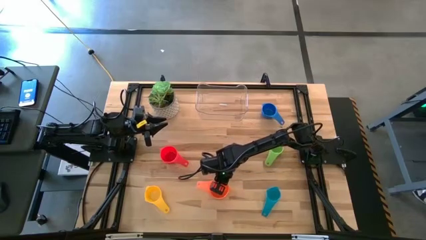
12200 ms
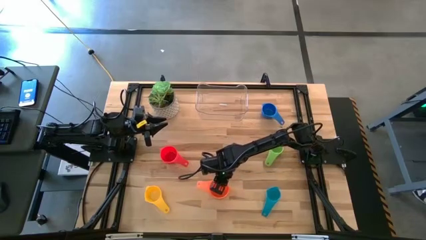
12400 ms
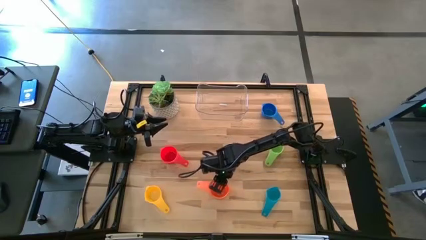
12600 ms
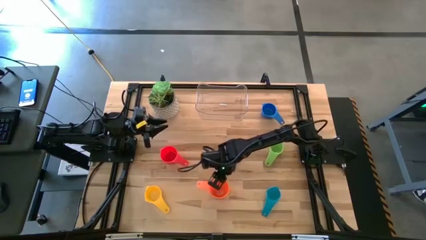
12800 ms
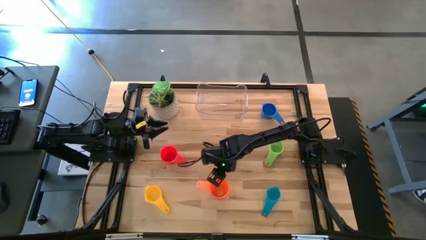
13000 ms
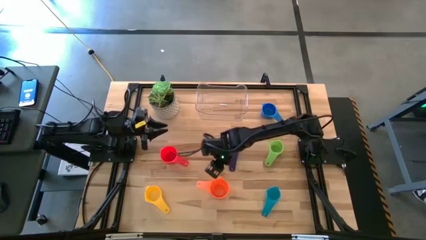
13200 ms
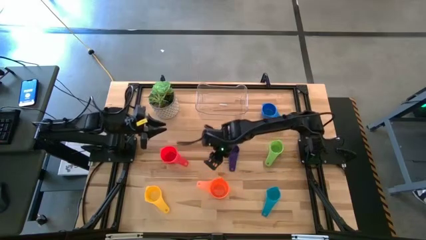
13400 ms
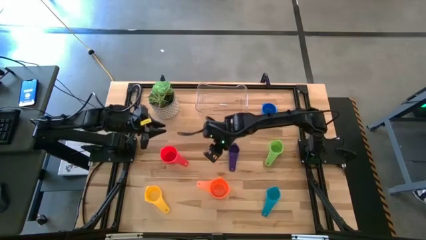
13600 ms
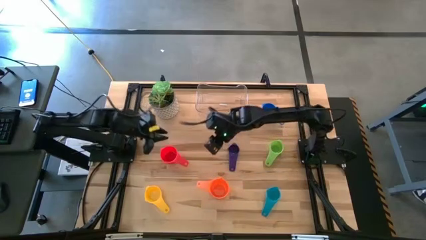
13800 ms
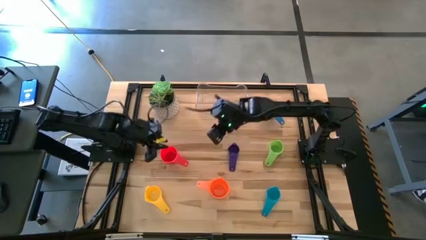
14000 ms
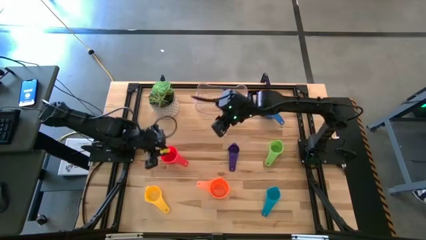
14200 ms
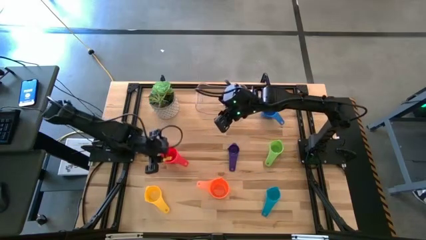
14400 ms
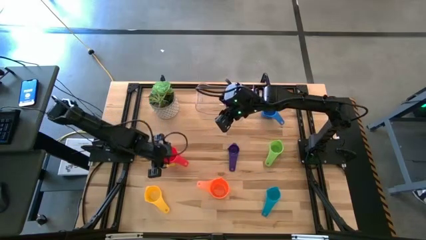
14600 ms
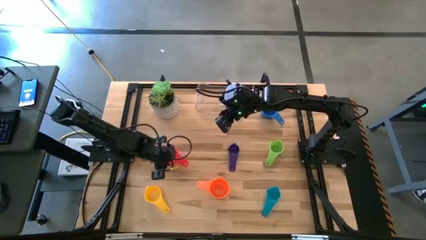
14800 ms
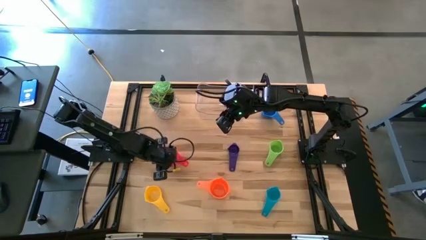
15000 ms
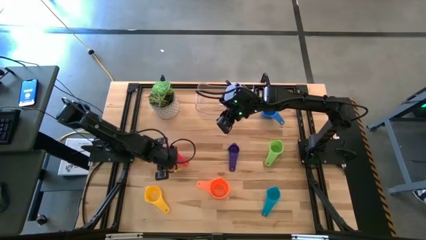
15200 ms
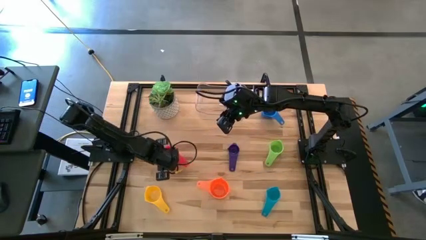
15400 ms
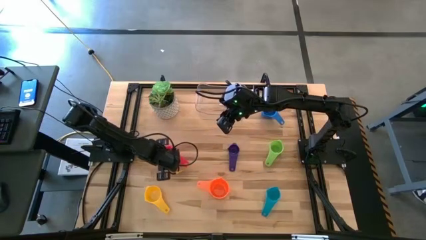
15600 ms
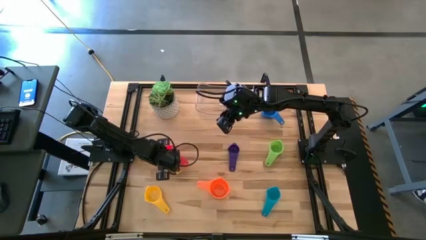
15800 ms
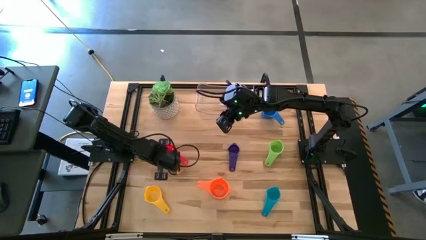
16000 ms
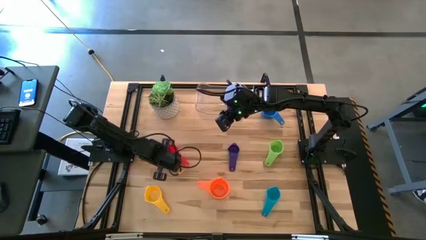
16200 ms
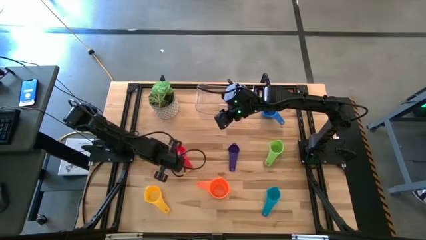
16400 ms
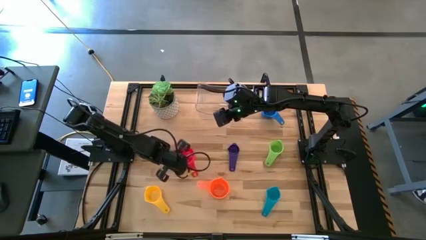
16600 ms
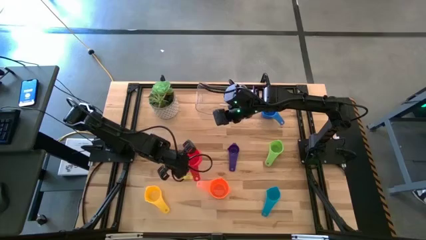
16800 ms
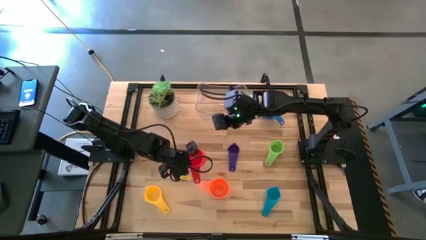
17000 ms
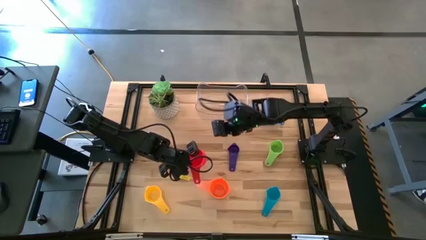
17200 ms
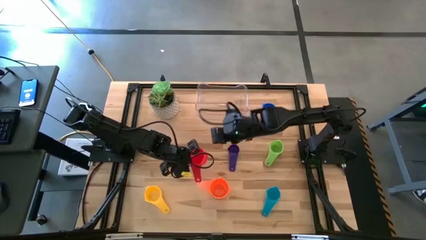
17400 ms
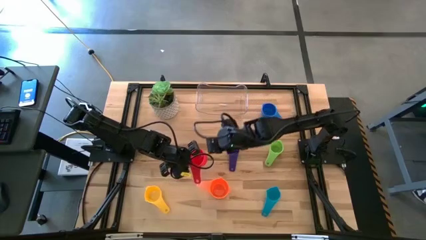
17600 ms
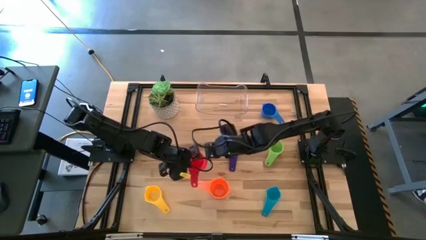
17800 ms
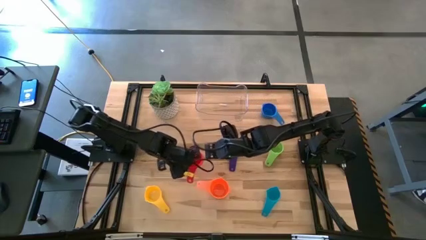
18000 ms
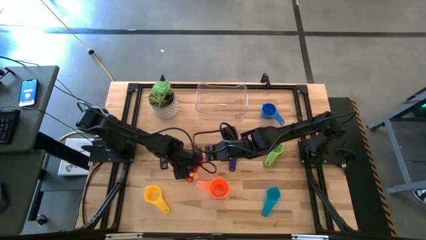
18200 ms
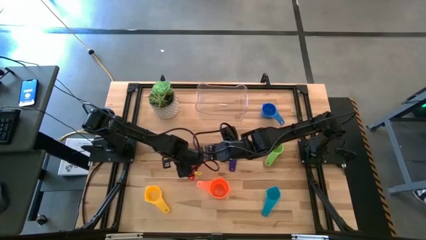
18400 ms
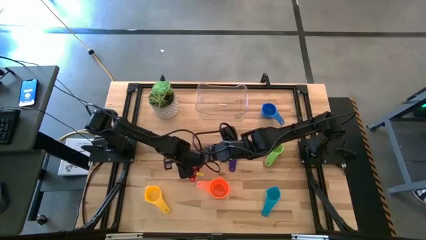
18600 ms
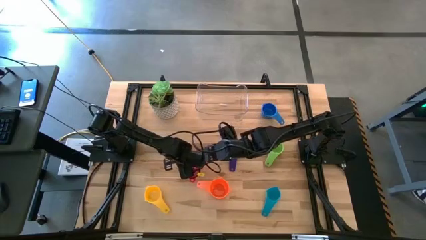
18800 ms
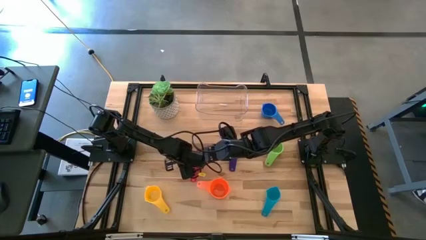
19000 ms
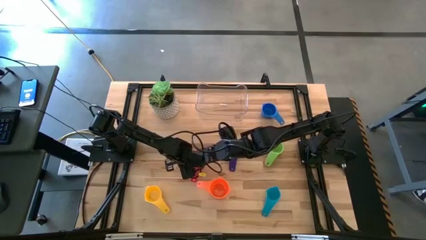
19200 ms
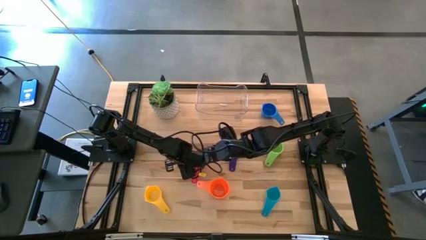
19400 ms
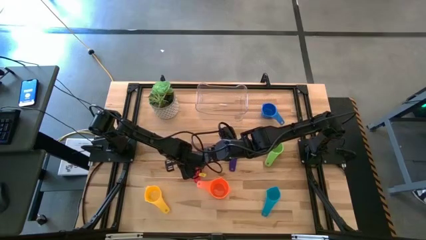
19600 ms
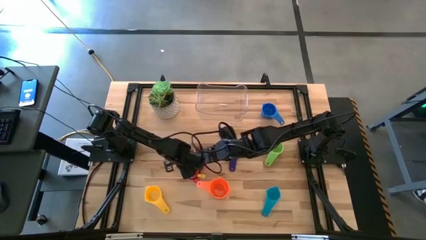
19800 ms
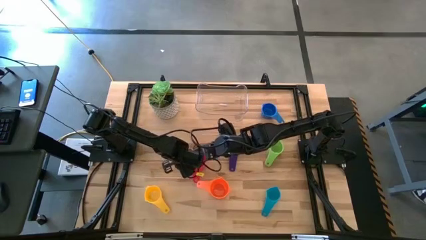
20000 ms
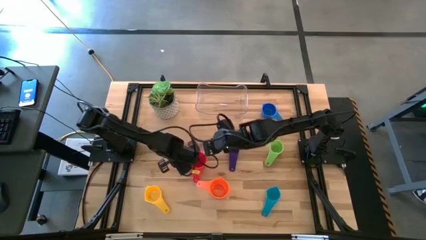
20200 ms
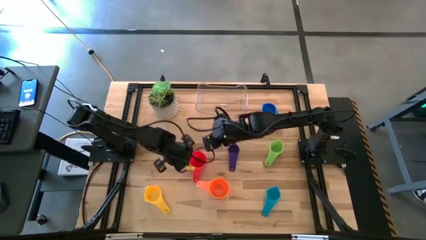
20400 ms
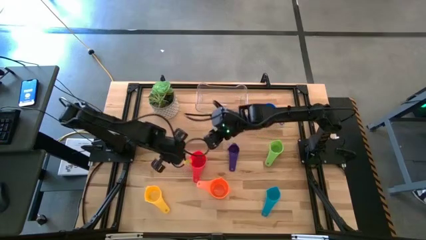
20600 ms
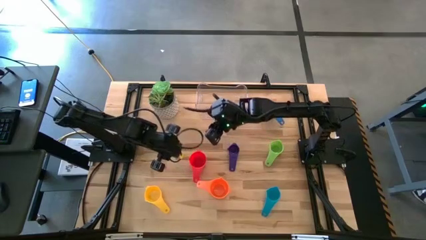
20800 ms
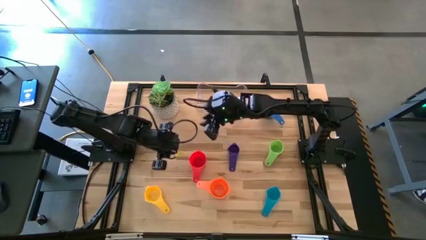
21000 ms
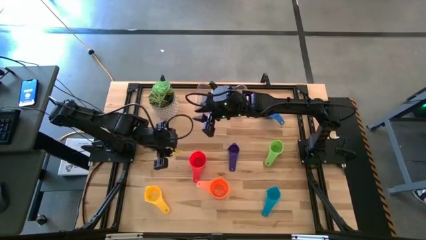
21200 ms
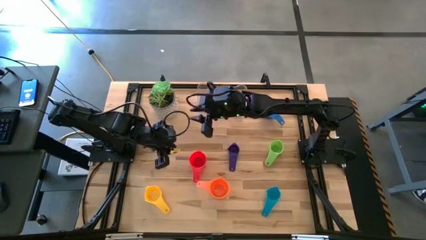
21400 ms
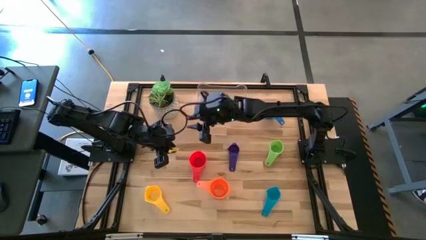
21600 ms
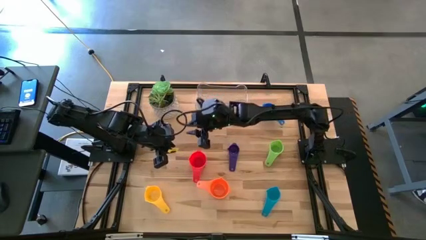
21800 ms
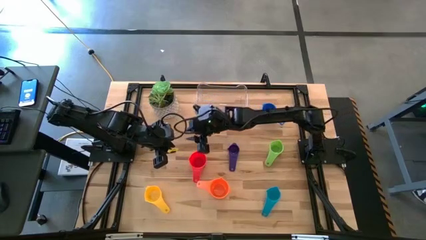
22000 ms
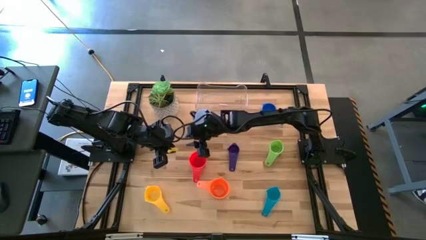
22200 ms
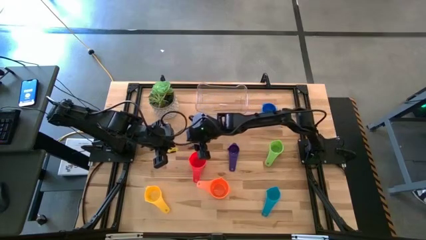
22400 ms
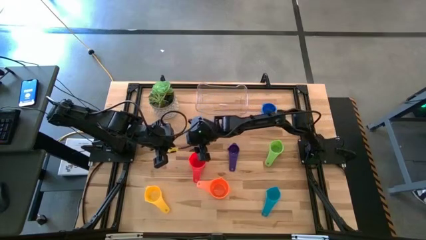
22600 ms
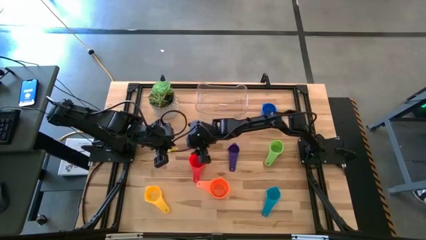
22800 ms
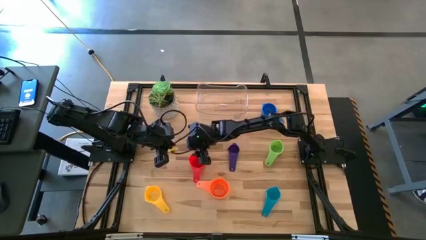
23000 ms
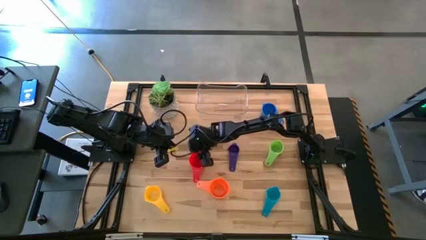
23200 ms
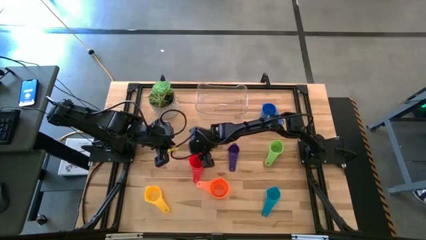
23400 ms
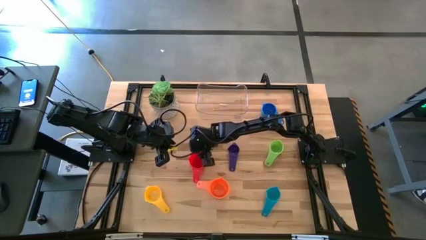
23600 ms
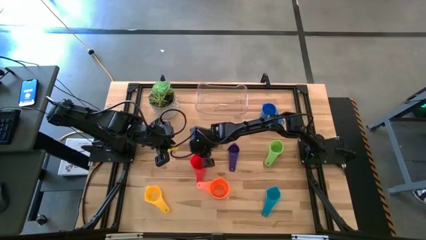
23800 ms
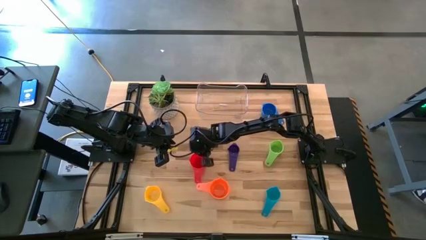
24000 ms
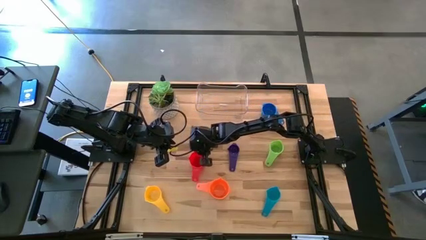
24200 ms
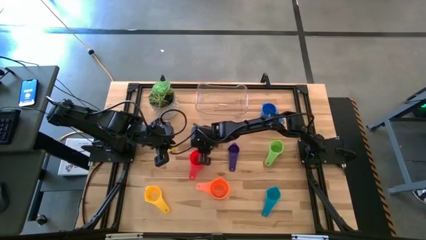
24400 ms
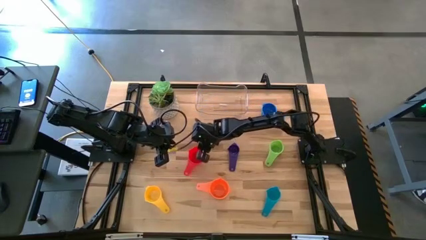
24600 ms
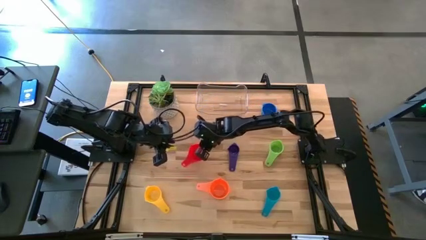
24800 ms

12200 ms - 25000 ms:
Task: Nest measuring cups in basket
Stack the red measuring cup into the orange measuring cup

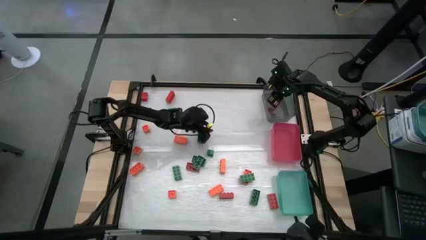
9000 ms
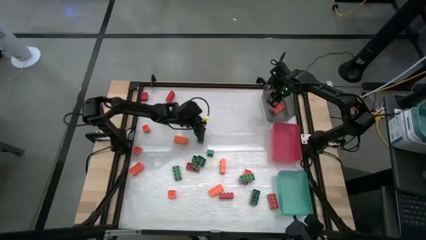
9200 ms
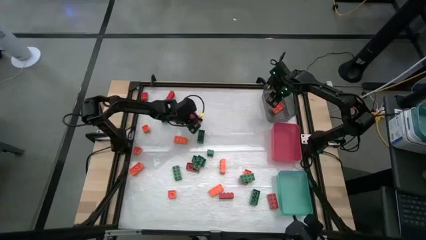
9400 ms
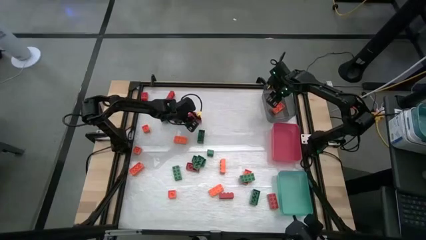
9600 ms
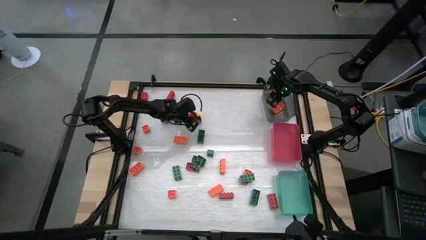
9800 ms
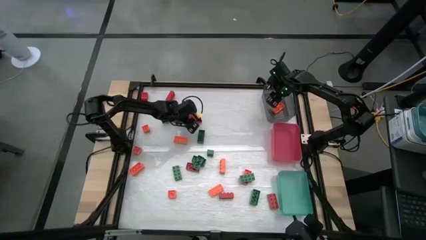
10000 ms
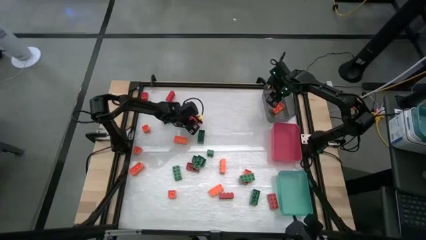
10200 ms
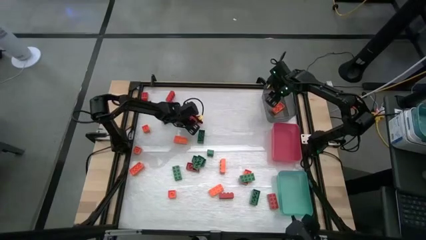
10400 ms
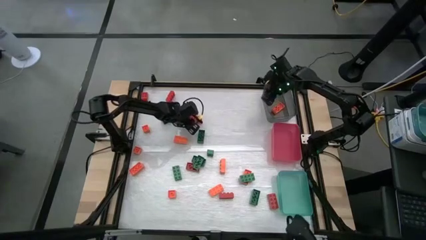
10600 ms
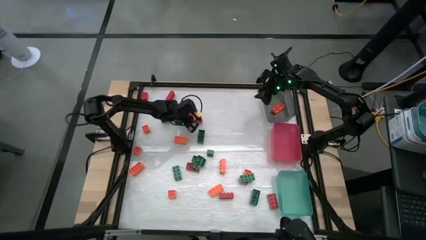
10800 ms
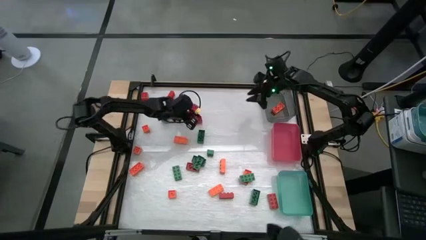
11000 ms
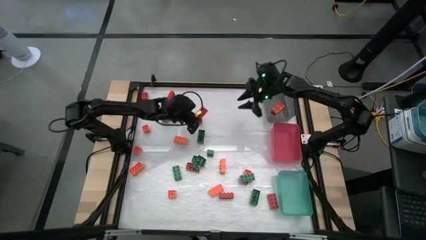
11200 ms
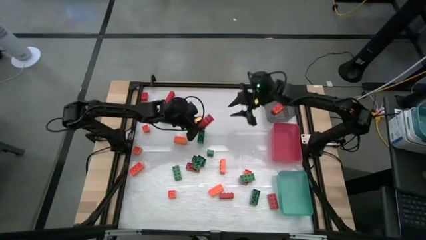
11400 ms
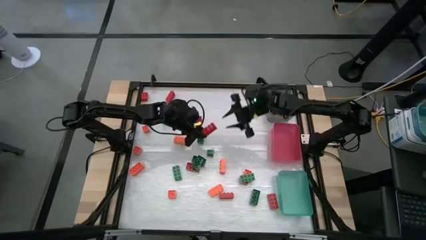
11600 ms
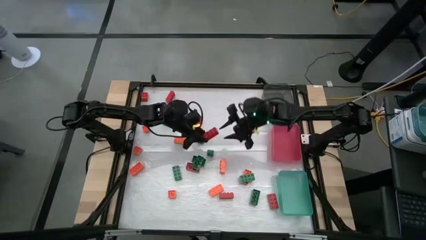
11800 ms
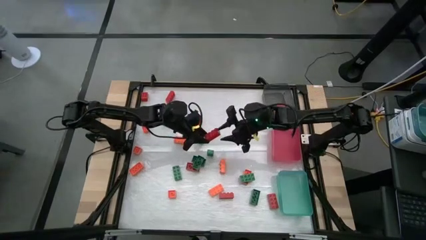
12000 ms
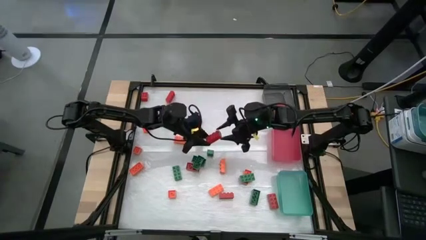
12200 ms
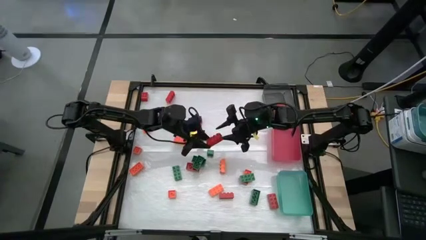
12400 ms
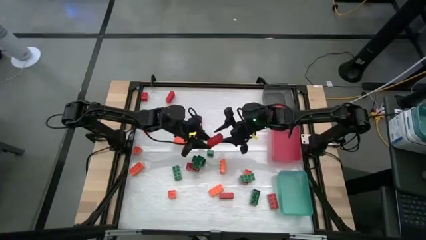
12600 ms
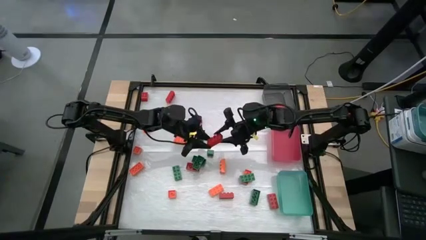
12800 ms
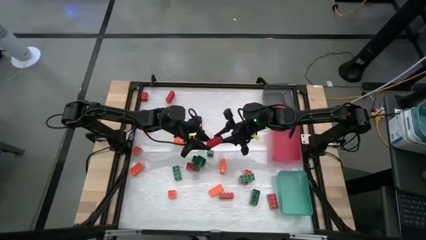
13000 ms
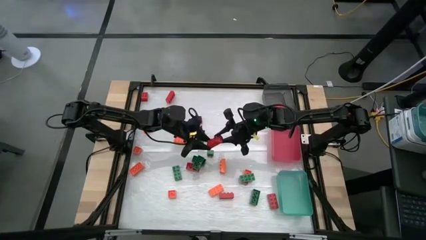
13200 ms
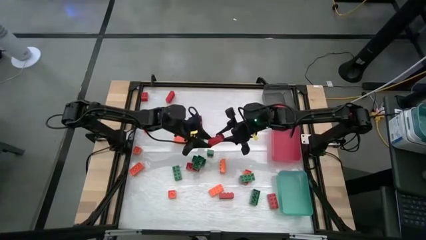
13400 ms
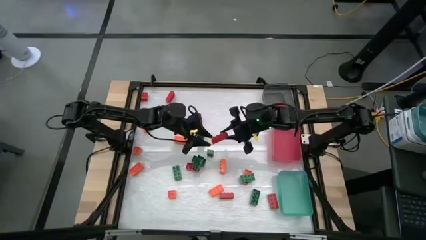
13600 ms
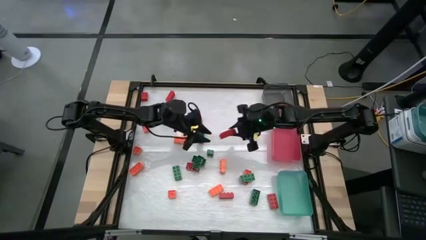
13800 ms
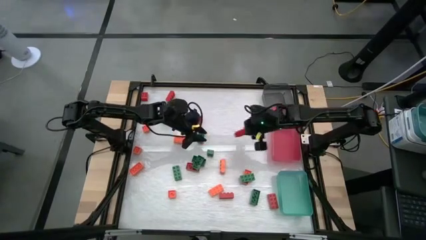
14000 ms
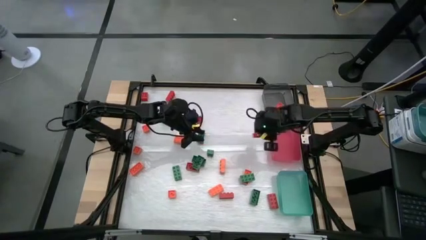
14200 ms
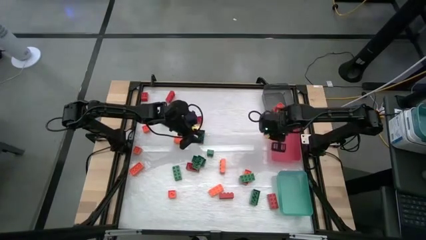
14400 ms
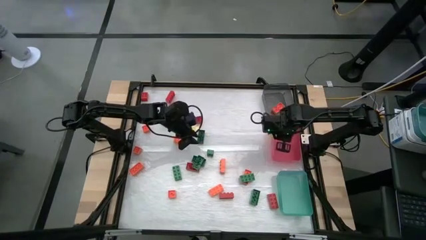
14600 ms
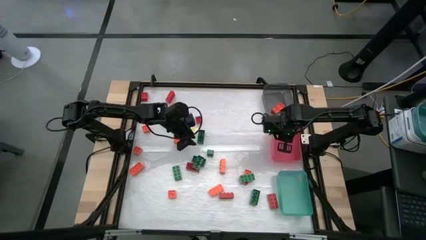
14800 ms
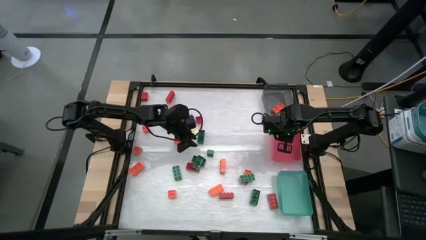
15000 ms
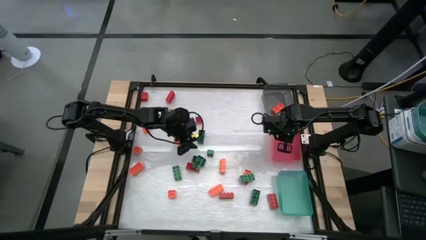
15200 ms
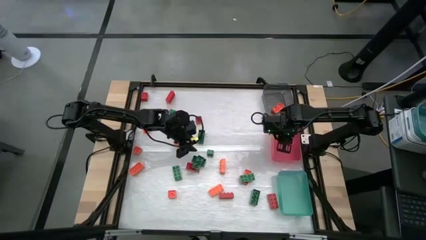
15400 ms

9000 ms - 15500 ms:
Task: Sort blocks
Put the red game piece into the red bin
